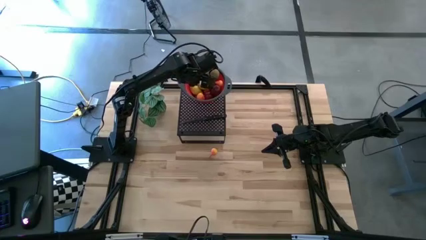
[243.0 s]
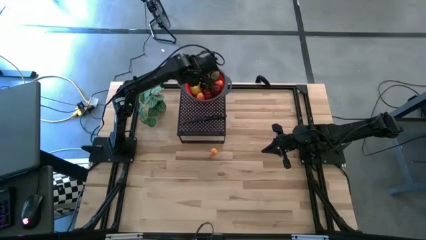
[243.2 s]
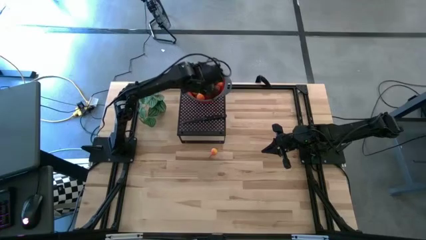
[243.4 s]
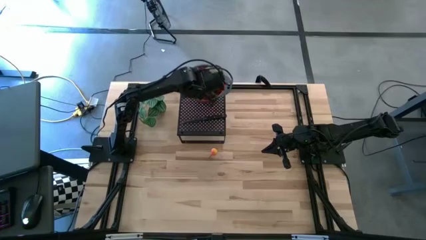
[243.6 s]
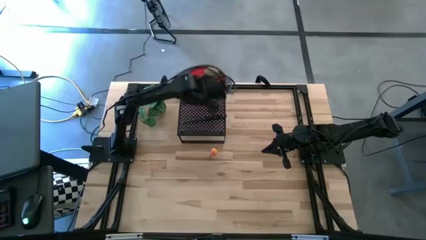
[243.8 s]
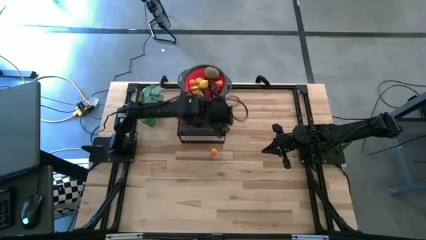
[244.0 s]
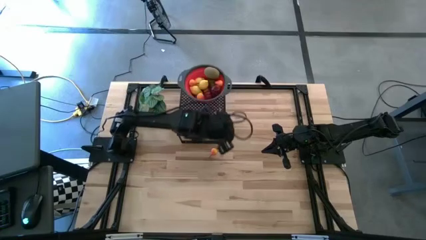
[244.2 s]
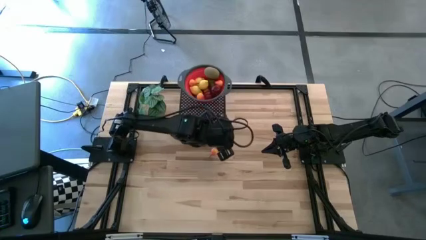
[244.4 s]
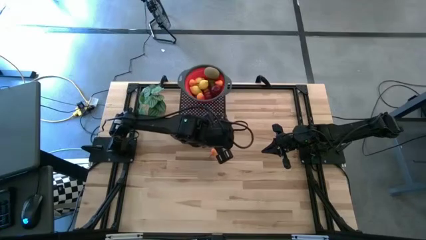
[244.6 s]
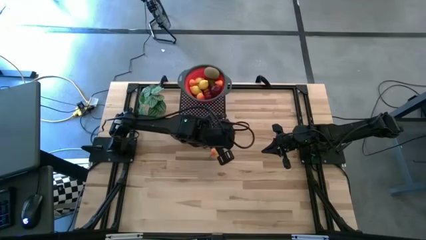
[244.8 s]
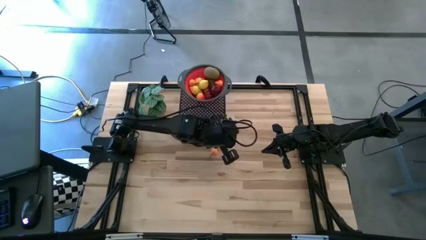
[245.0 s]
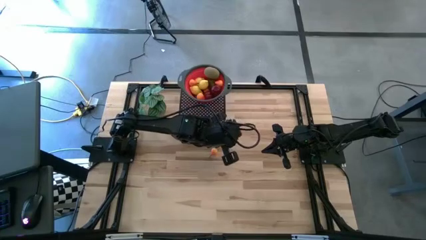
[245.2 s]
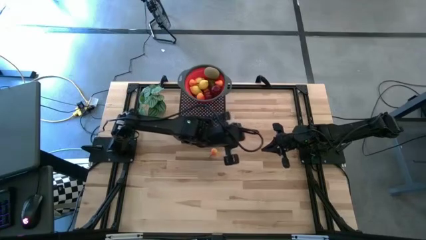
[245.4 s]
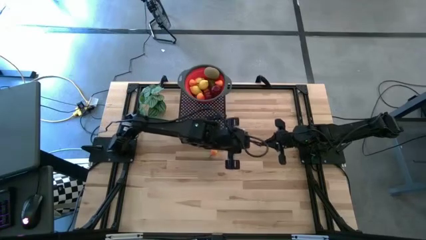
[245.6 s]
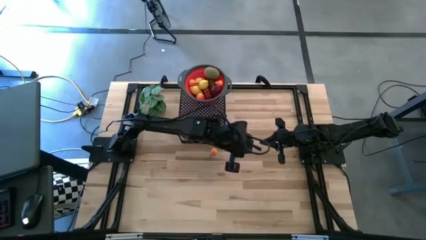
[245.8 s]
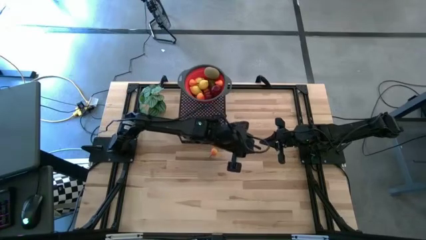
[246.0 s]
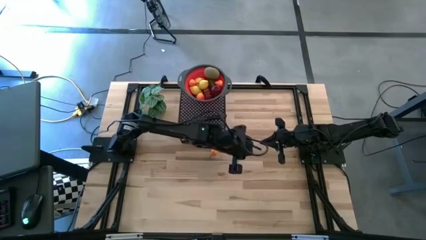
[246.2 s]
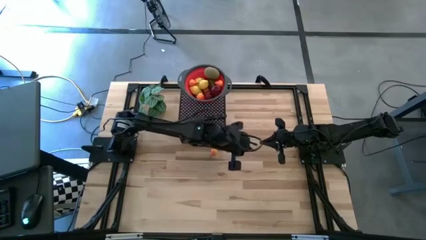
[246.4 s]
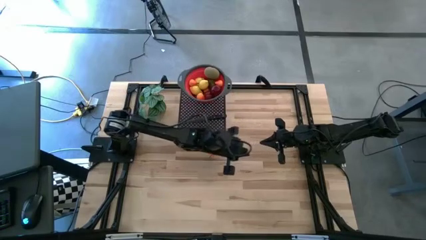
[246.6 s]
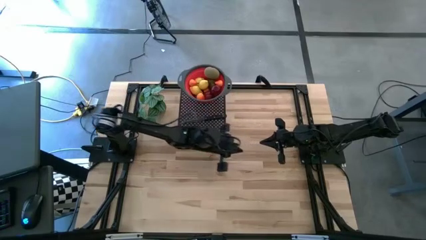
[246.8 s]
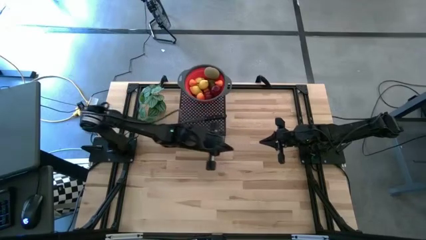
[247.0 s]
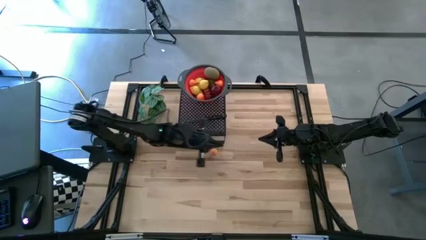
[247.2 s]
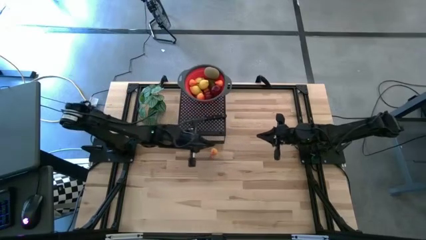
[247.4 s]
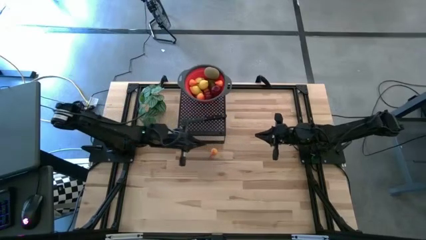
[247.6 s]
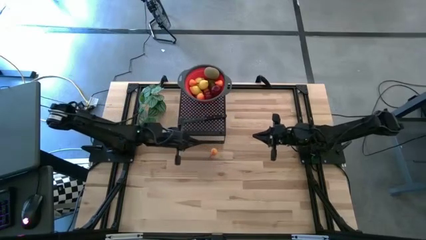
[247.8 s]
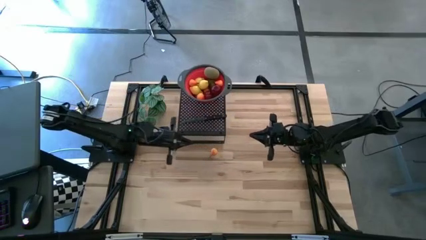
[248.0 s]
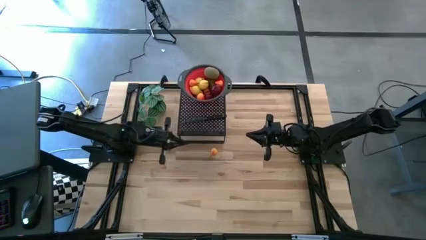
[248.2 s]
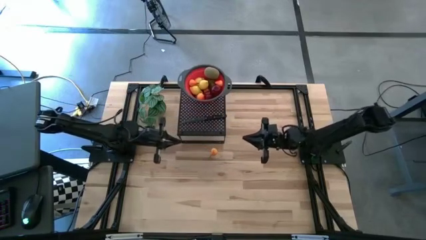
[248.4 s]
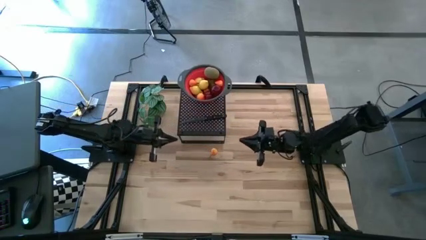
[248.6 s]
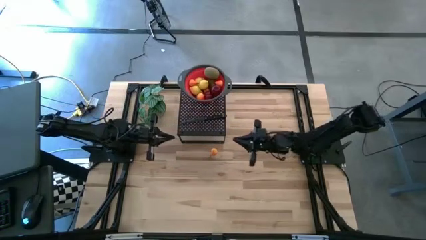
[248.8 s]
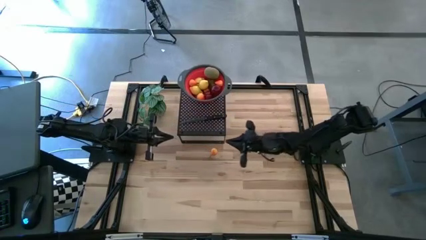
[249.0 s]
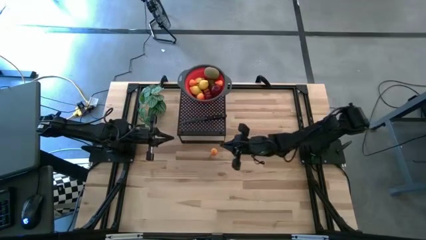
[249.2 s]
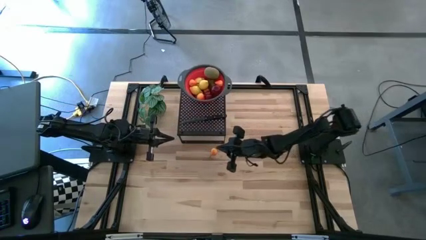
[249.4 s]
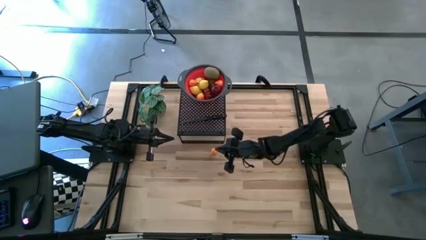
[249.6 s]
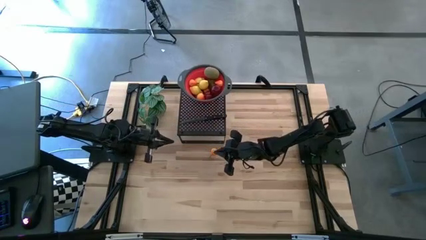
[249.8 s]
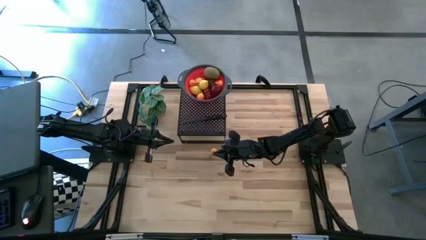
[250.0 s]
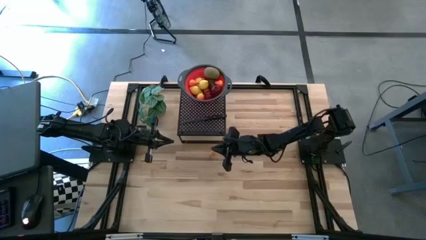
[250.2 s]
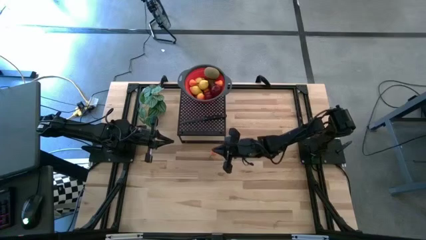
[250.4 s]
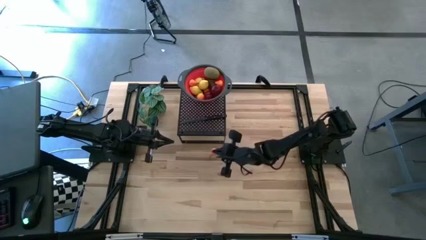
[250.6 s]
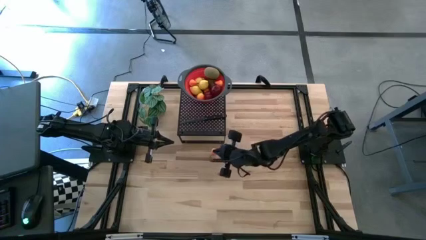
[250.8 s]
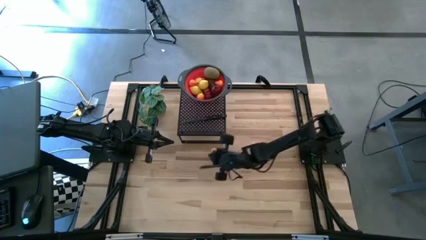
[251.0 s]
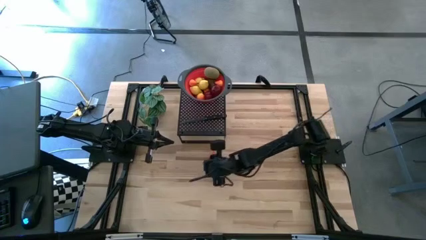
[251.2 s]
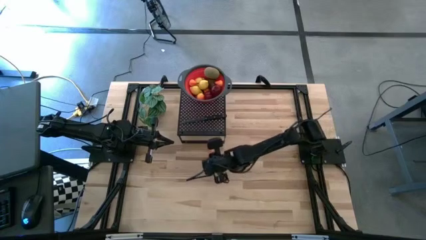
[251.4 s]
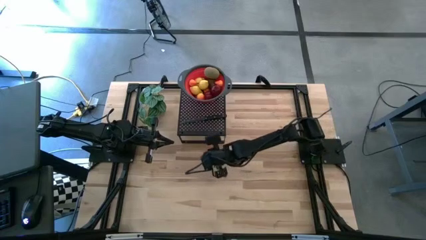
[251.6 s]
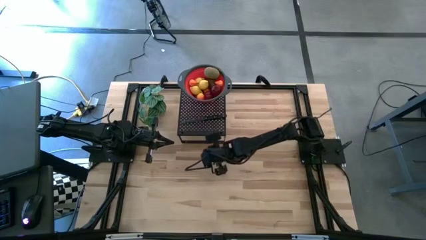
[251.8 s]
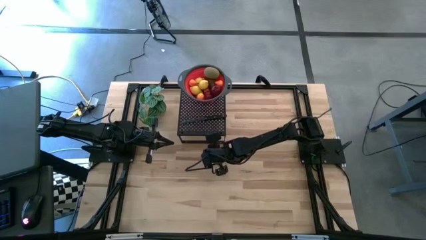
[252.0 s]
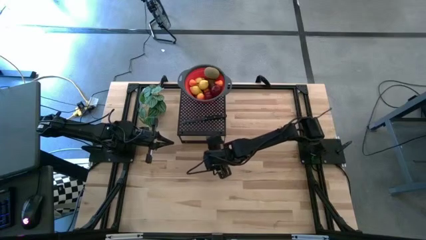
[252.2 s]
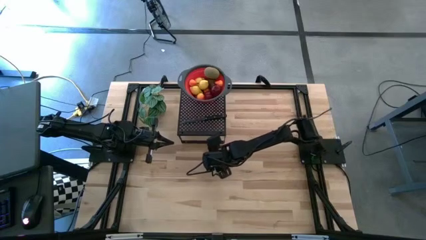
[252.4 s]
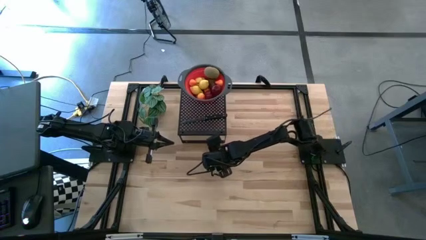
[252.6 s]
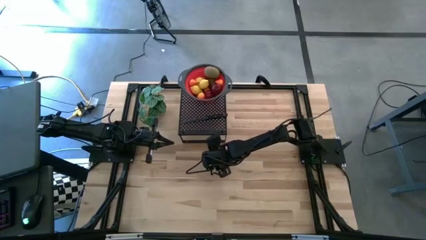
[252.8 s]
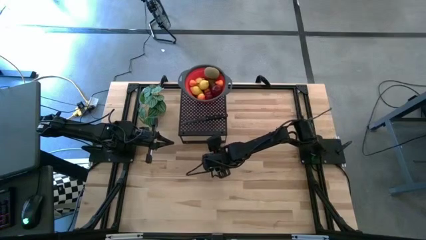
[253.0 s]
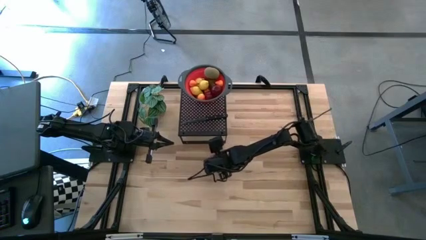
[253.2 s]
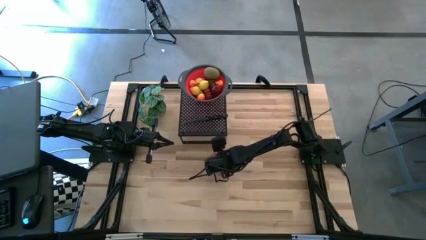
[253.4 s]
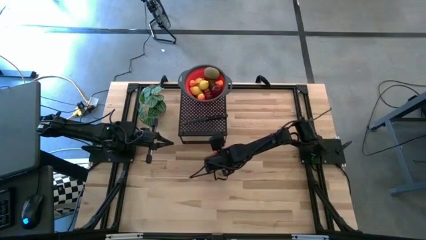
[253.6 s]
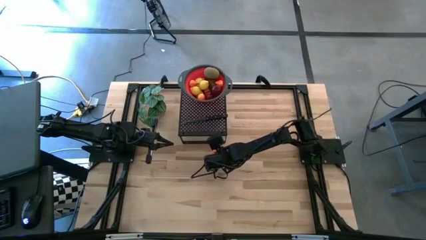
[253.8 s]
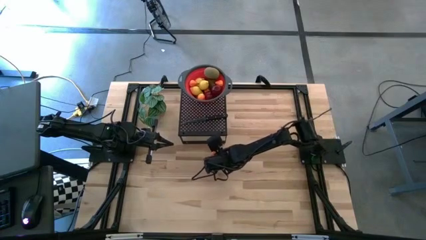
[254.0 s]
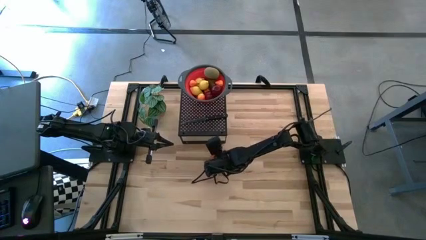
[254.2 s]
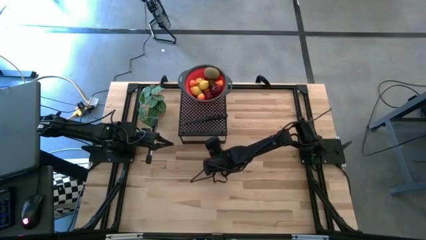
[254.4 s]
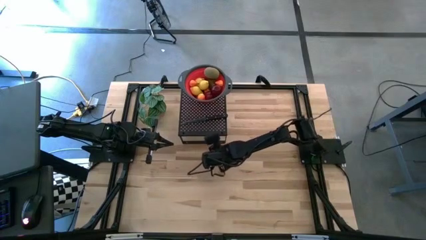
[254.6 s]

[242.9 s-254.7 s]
Task: Pick & Place Fruit
Put the pear into the red strainer bowl

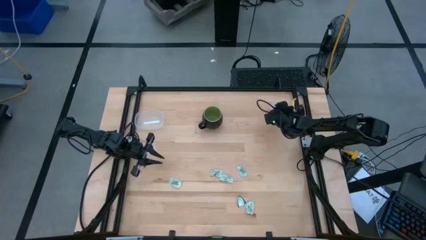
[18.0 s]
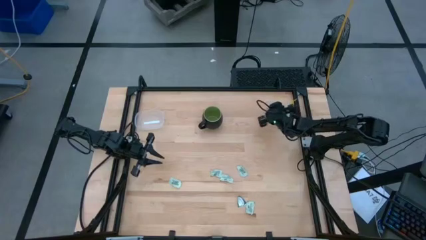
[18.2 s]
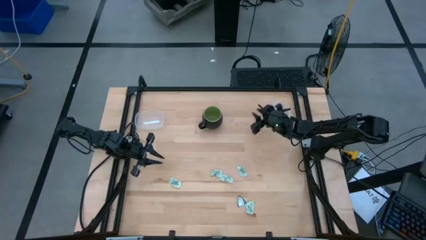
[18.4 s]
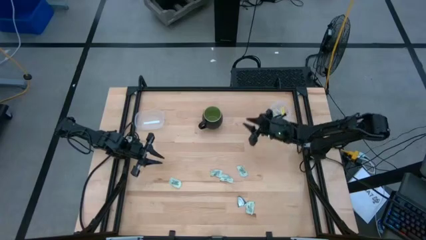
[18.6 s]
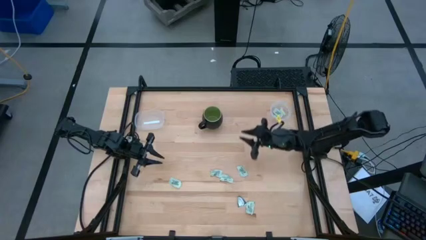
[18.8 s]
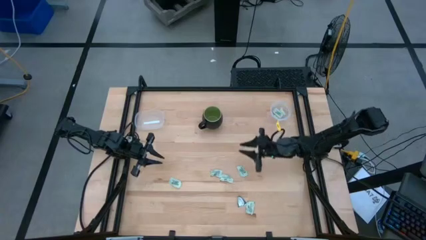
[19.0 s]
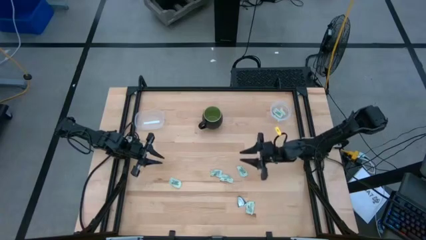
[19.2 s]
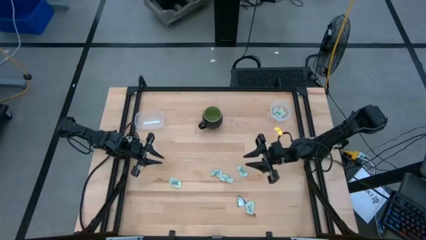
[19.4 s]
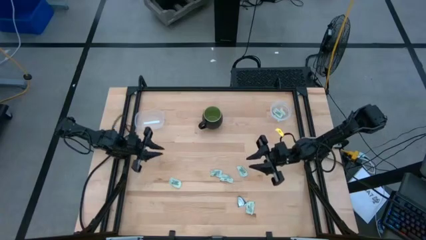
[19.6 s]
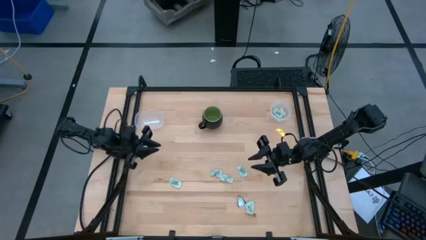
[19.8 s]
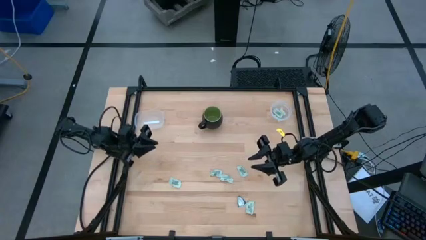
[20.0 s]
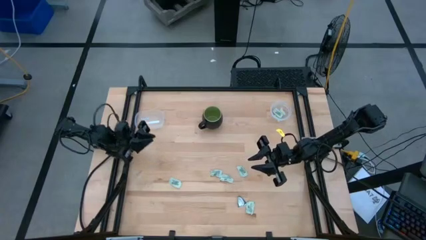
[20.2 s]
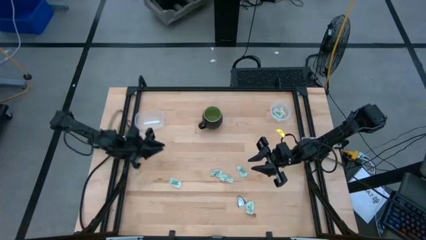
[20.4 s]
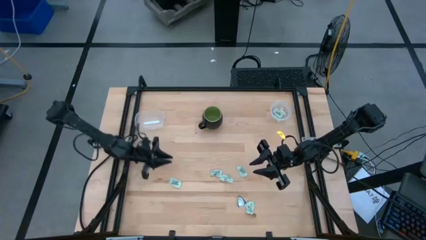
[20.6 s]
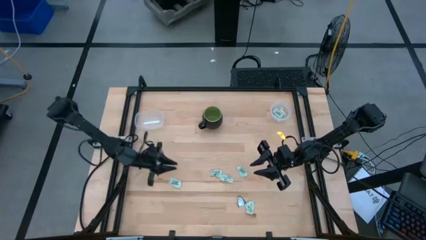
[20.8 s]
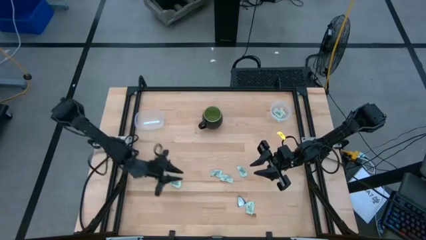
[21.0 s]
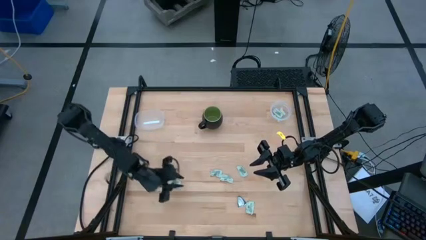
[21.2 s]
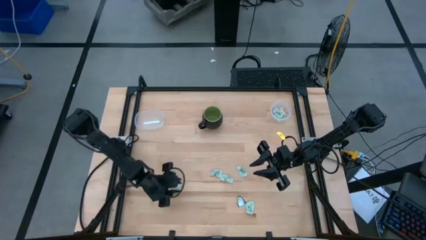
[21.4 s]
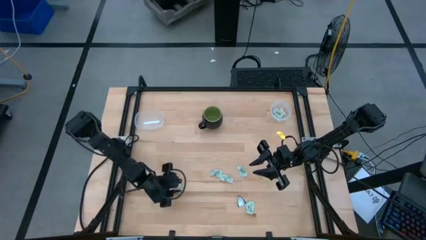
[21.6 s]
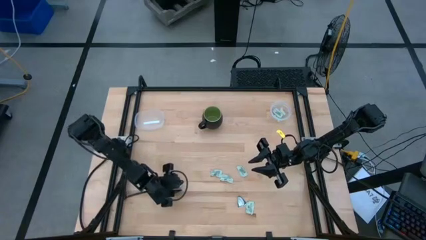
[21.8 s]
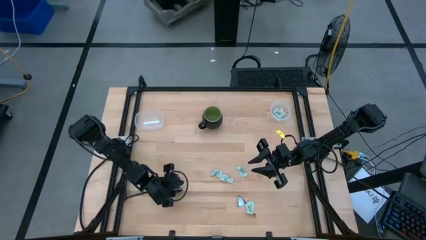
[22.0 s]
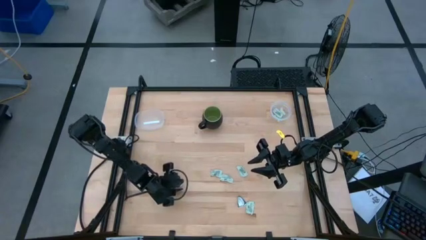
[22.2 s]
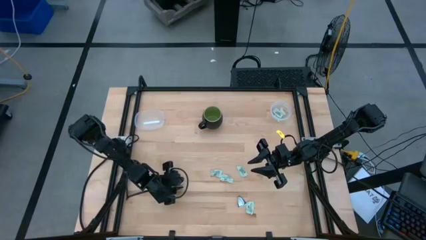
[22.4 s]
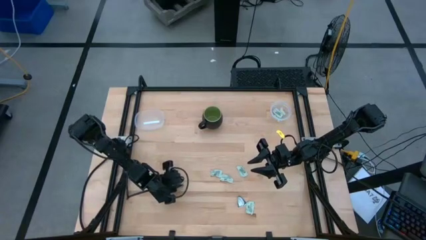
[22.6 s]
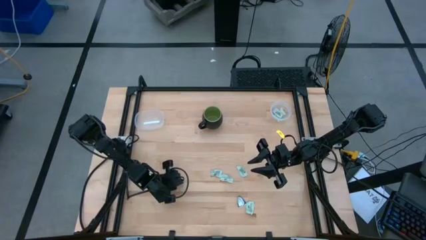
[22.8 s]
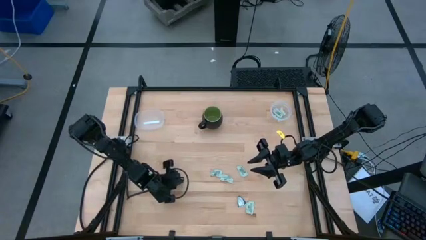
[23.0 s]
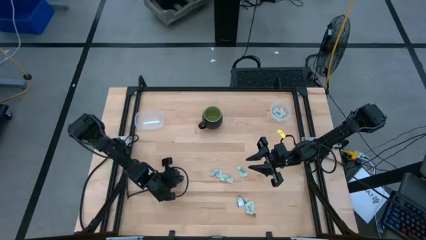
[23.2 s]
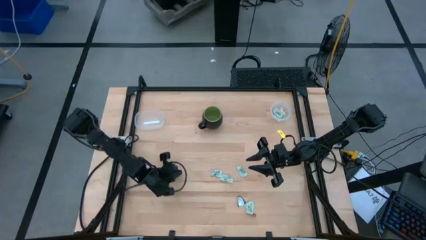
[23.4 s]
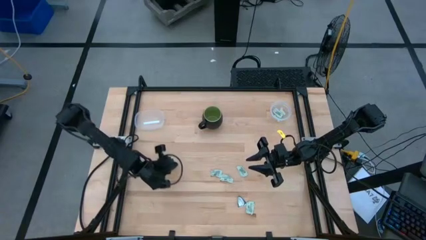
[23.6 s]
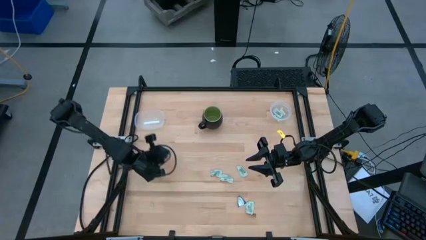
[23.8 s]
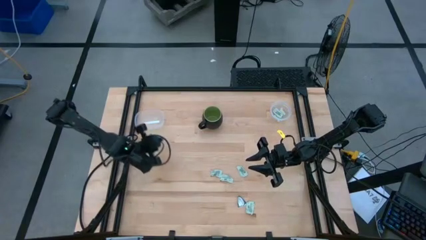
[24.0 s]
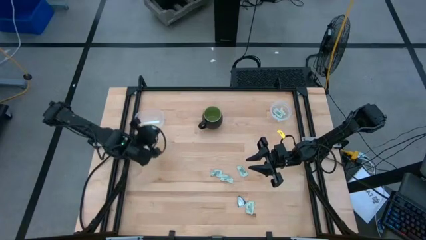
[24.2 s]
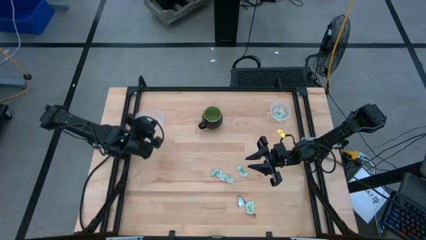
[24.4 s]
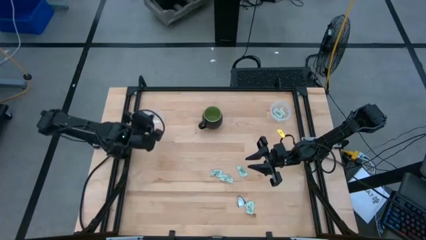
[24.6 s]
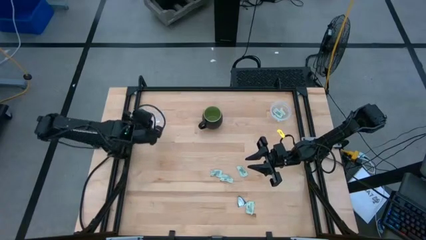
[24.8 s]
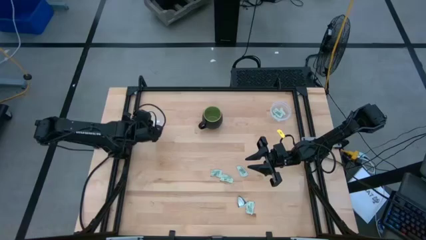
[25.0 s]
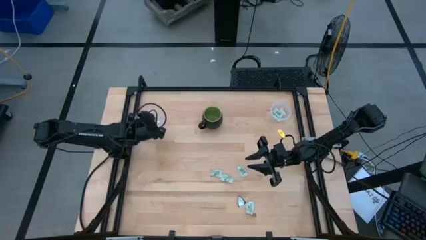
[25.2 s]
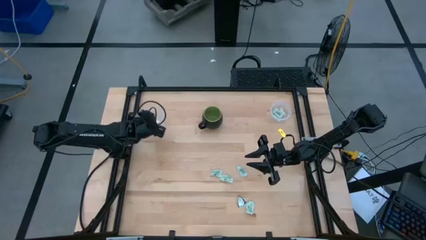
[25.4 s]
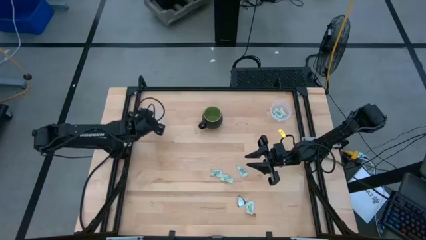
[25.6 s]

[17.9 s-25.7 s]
Task: Pick and place items into bin
Put the white stevia packet into the left transparent bin
